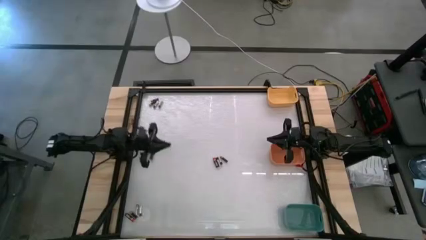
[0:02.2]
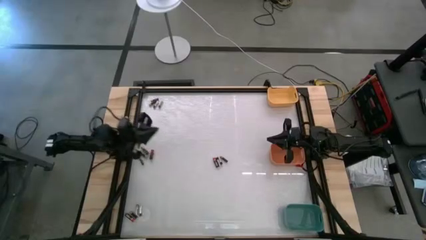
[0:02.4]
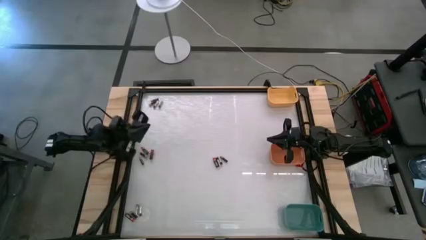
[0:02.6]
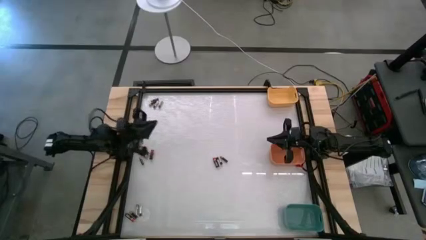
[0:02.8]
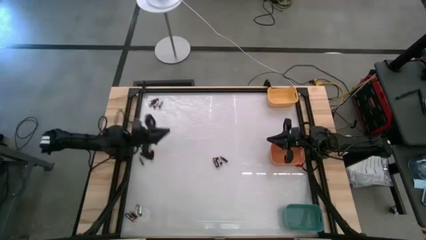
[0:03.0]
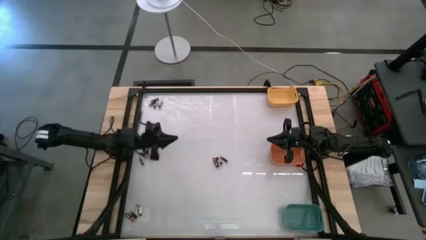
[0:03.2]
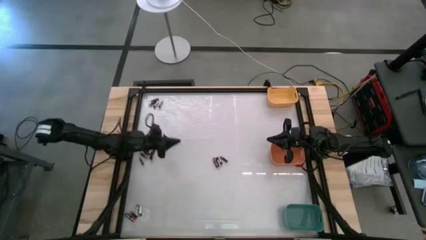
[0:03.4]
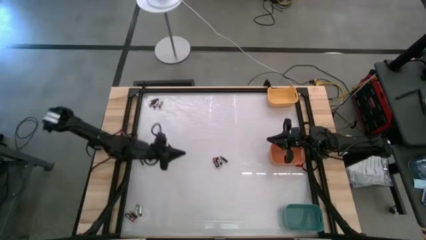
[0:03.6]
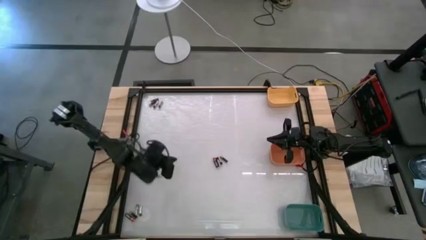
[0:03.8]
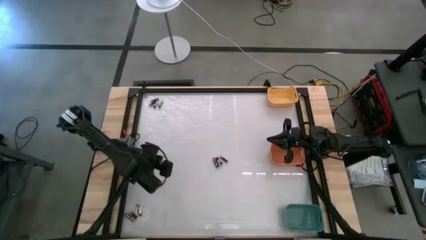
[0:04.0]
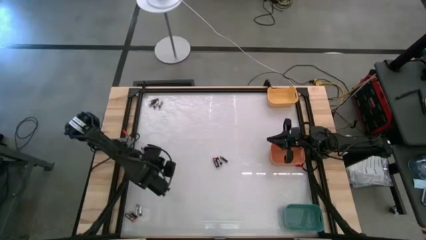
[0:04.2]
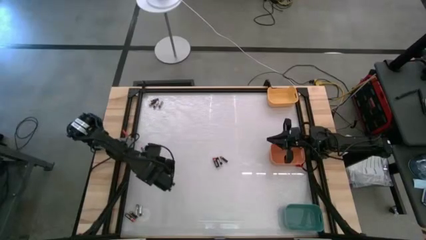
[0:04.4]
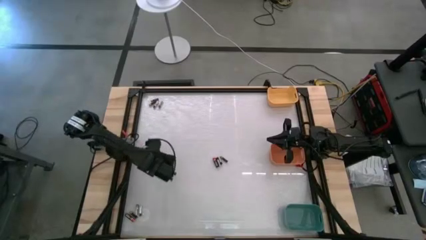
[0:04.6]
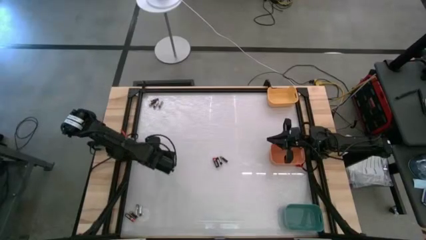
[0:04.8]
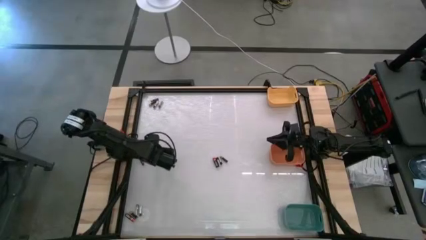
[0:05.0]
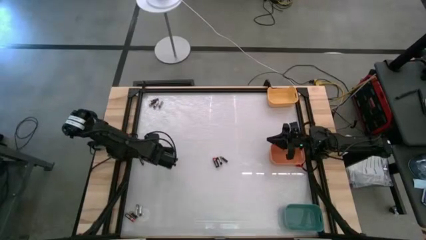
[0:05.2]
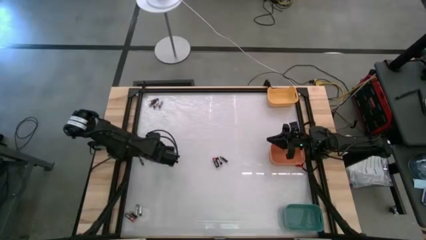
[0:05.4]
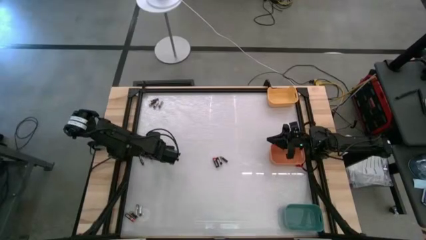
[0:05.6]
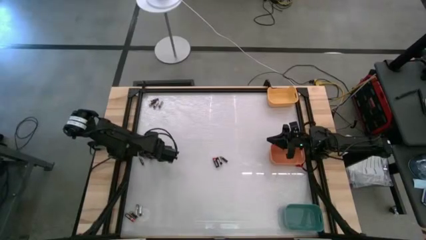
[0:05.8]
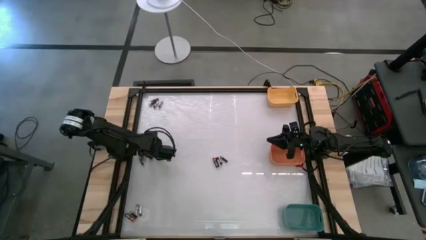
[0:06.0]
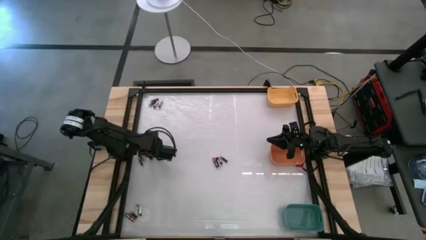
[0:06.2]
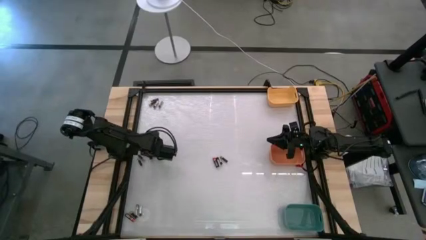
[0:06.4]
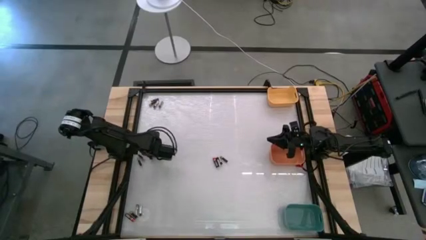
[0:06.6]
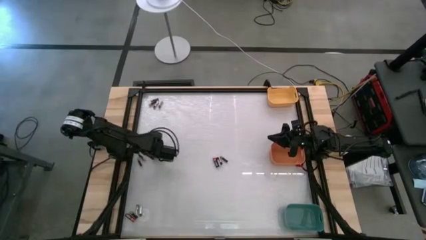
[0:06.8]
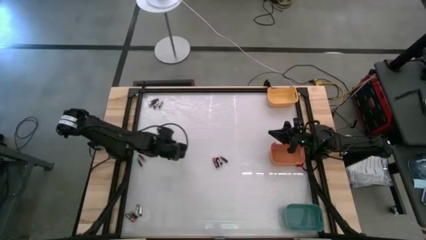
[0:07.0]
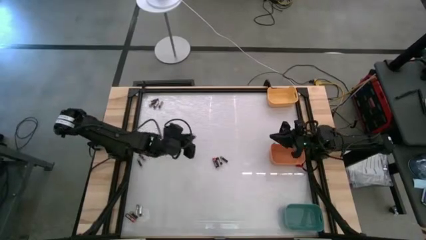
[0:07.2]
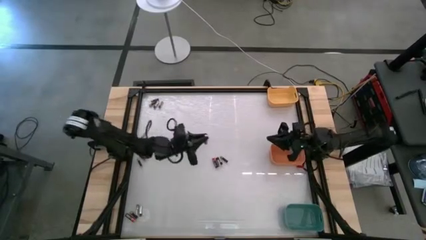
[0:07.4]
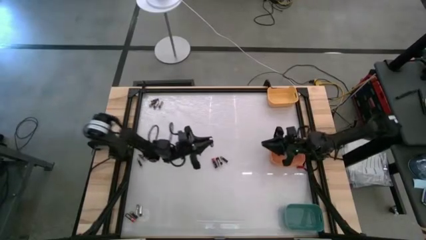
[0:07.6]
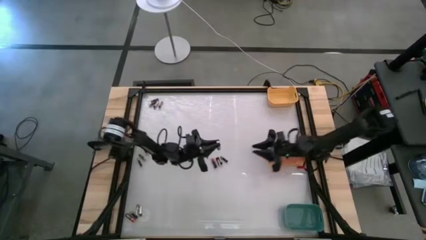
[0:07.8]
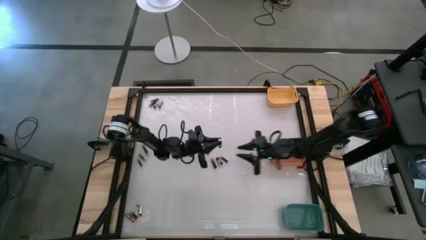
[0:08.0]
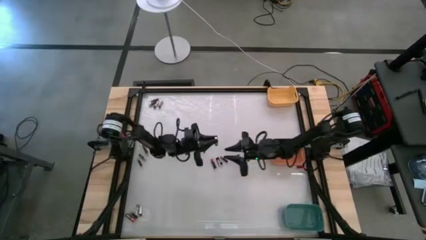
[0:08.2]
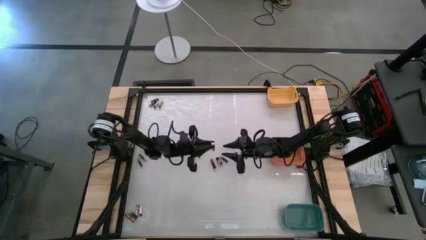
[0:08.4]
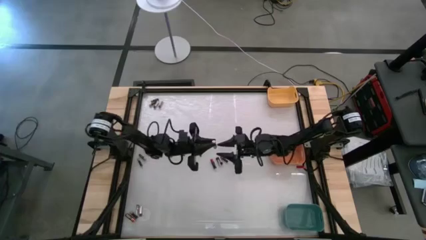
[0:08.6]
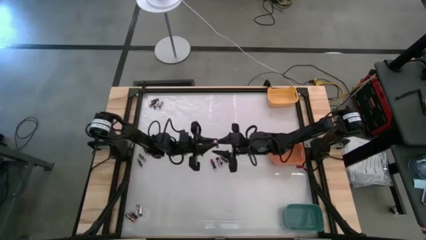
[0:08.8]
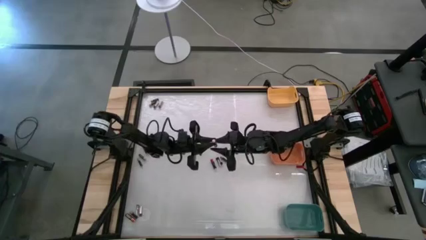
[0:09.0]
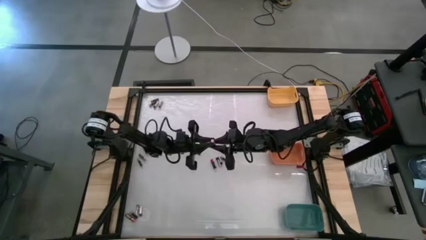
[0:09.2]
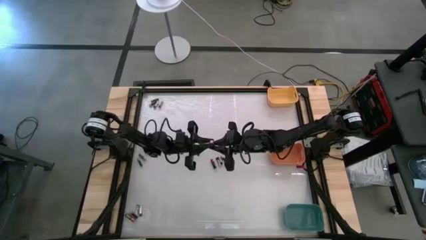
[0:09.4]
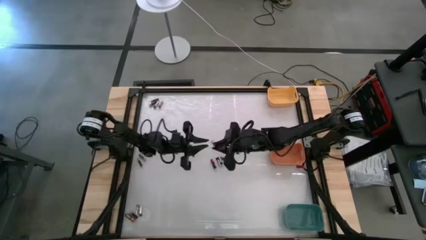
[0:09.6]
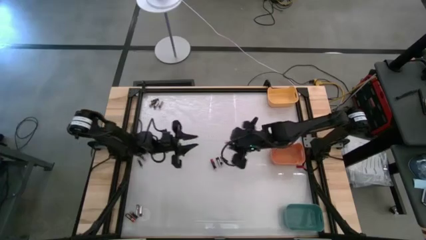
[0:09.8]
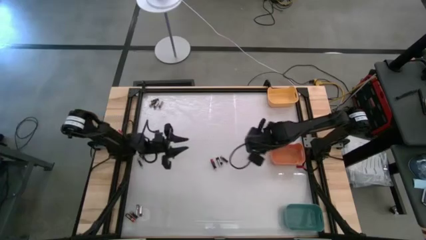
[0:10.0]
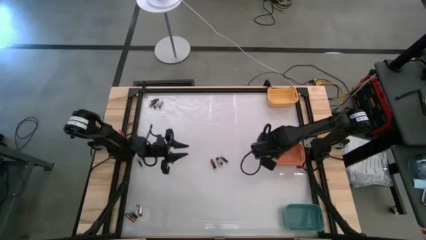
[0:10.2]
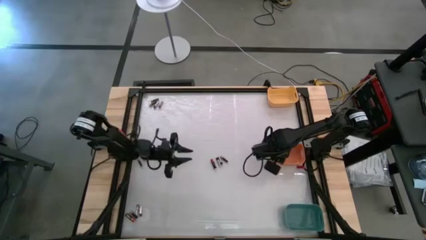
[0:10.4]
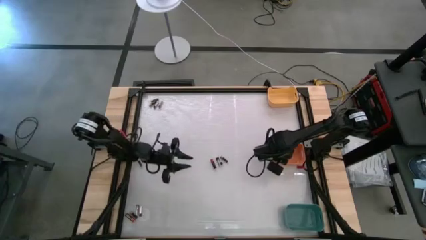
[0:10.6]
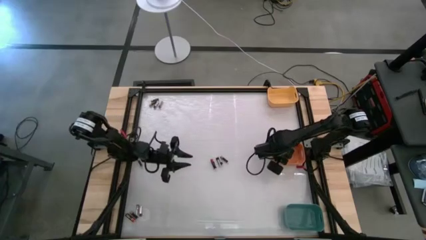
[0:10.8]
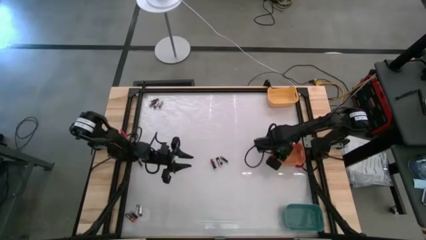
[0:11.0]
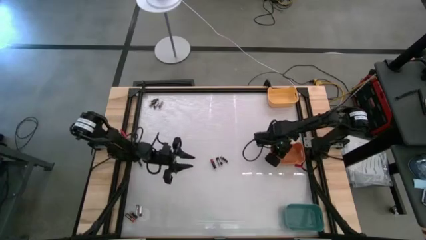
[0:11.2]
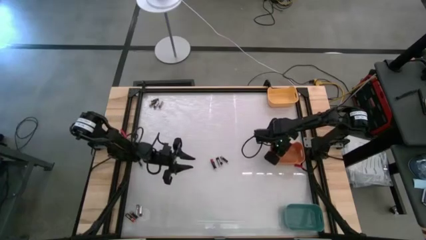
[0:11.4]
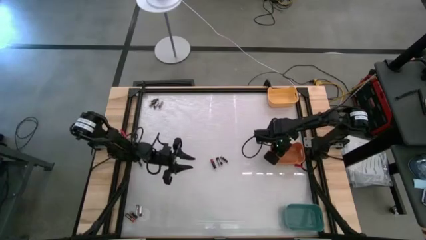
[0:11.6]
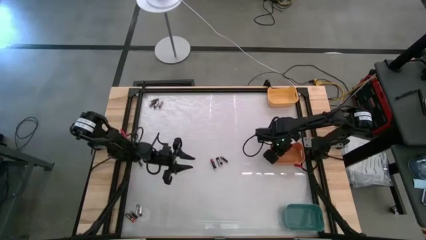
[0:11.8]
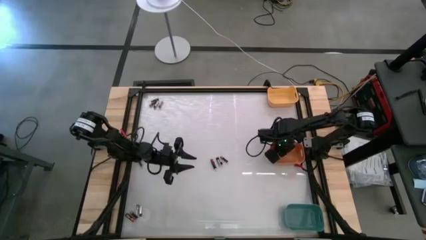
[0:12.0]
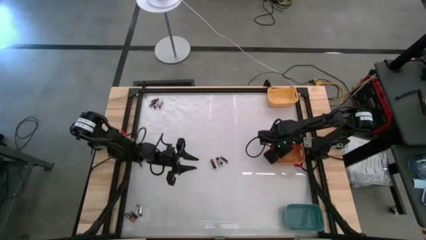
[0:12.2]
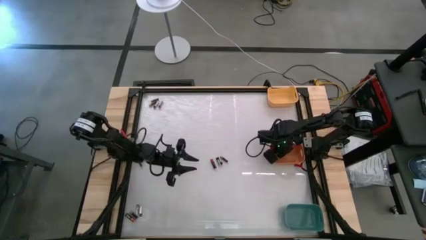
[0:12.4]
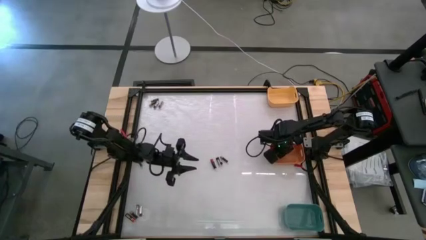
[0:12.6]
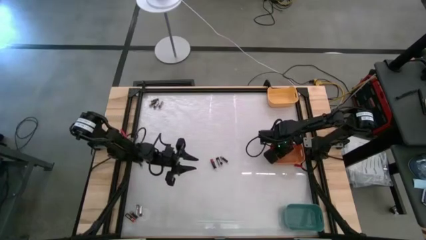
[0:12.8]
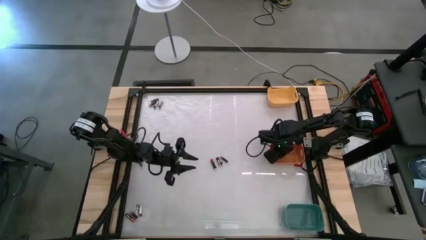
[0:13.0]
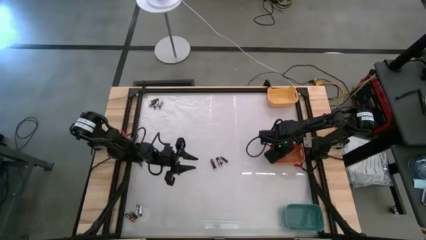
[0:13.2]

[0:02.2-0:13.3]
Task: Sort batteries
Put the black-red battery into the orange bin

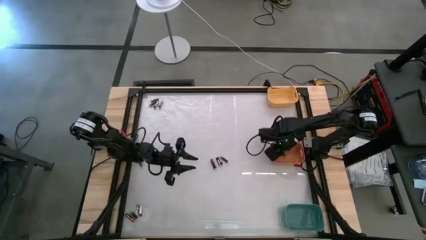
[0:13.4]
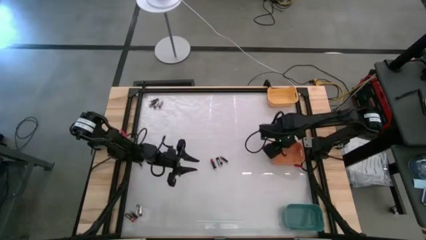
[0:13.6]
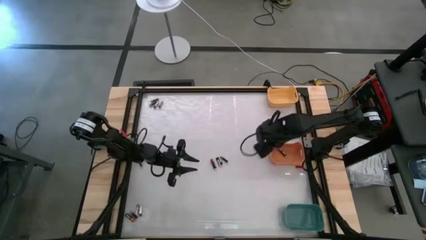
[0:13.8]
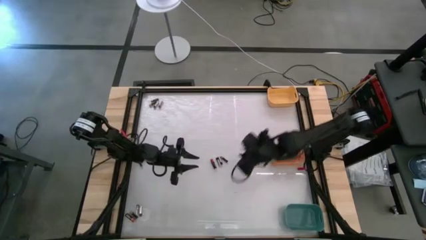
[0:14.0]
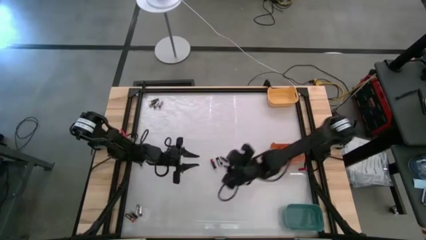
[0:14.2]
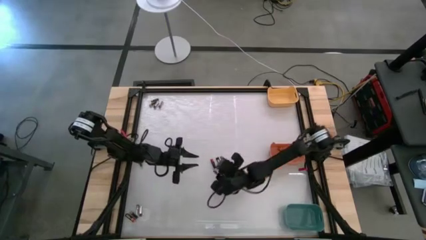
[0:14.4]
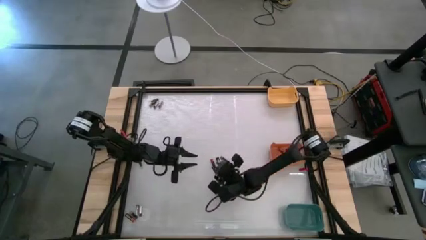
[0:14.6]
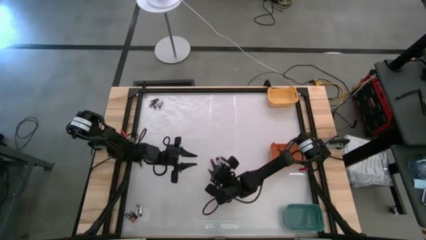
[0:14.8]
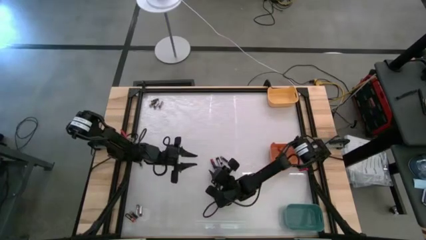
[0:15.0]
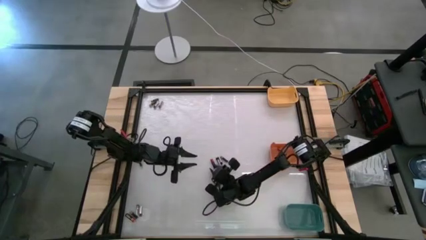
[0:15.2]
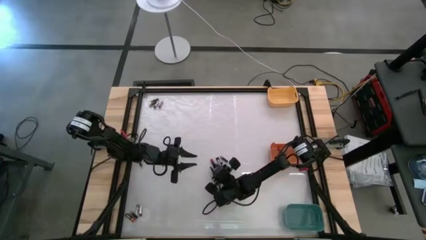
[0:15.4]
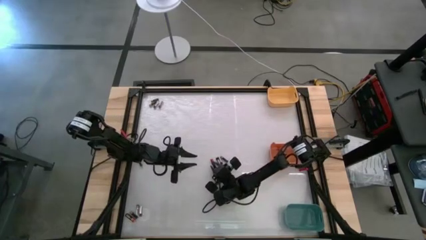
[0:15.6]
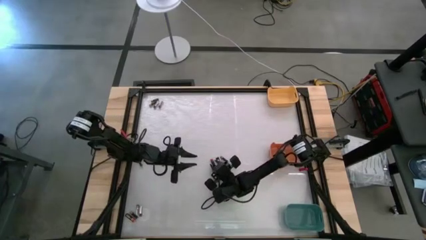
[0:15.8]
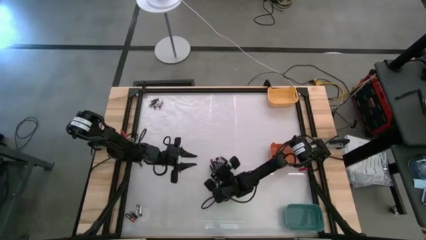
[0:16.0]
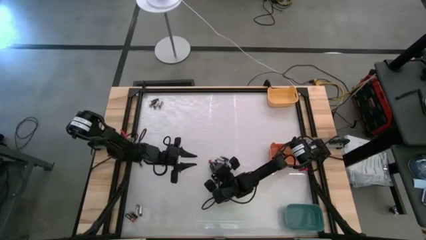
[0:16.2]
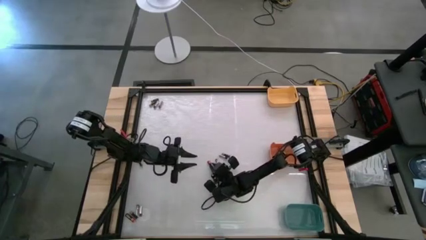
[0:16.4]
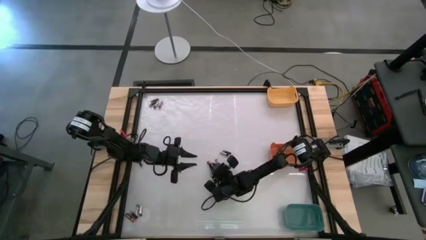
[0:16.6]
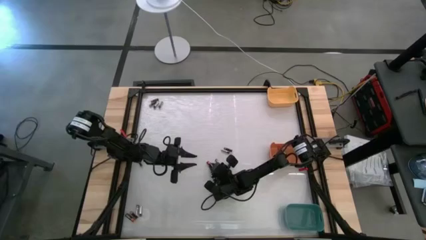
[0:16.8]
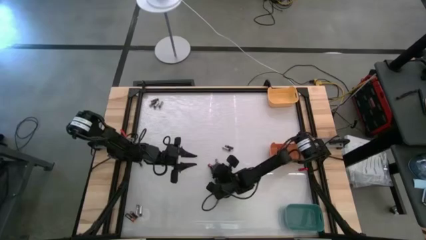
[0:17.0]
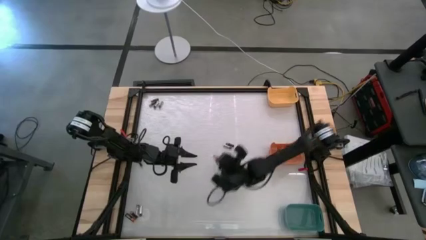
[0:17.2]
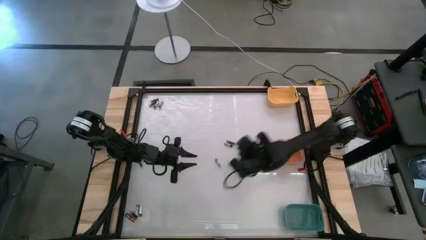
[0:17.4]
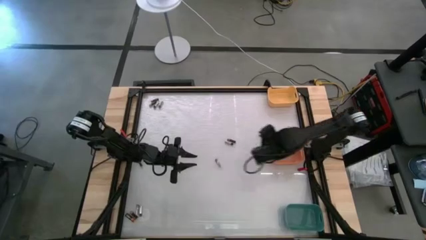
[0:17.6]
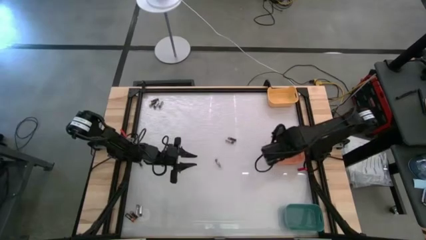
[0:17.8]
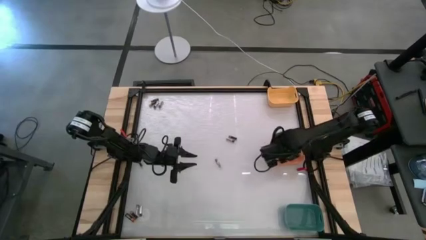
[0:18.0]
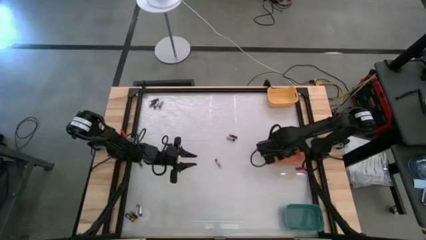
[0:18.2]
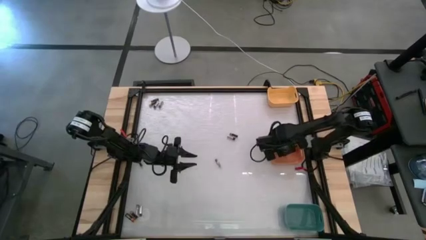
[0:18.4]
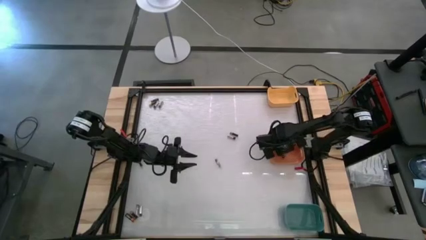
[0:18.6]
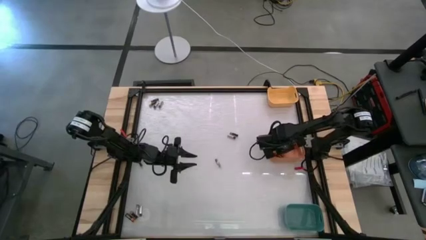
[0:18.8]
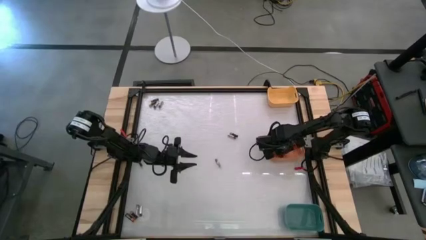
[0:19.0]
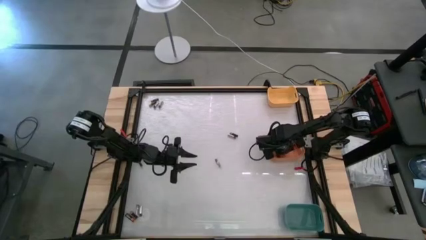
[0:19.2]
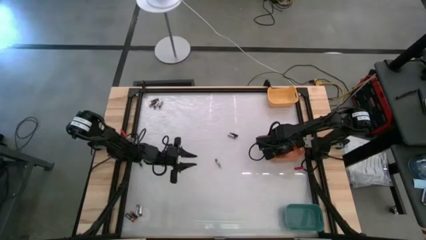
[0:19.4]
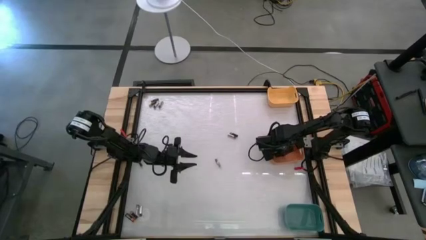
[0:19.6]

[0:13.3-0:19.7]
Put the black-red battery into the orange bin
